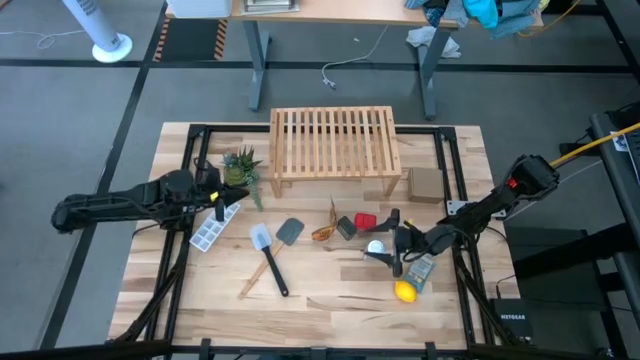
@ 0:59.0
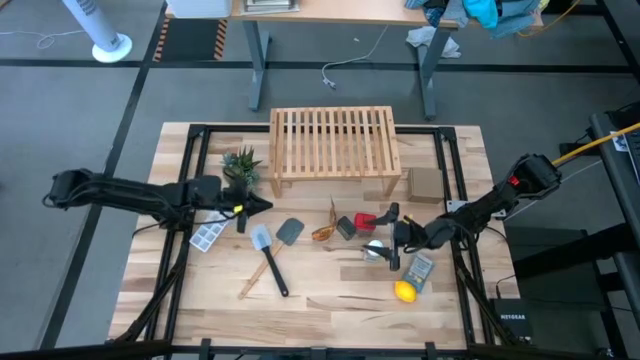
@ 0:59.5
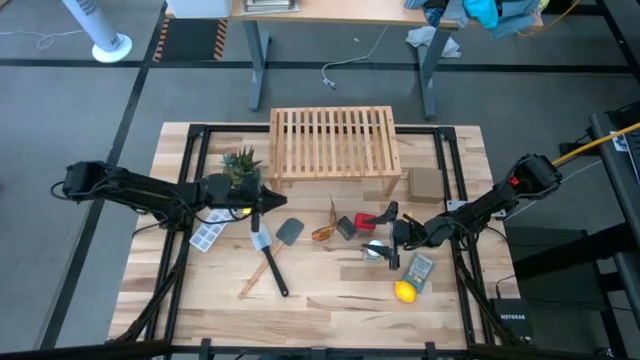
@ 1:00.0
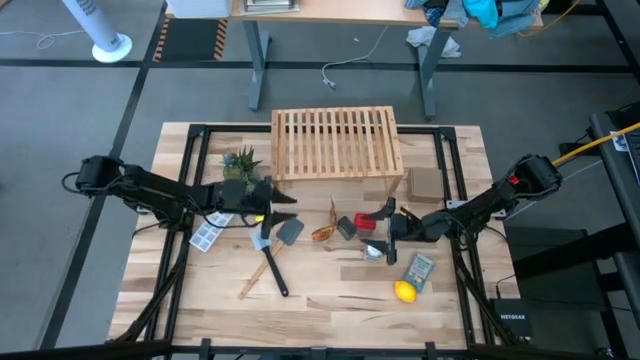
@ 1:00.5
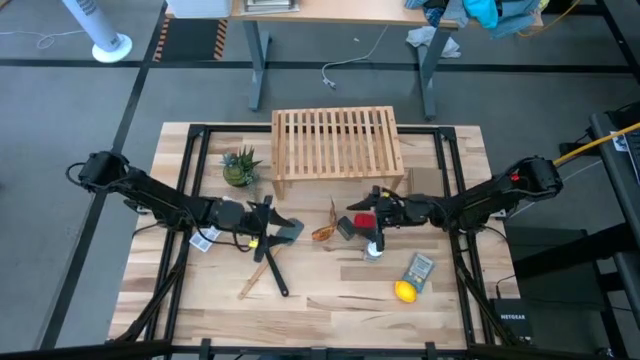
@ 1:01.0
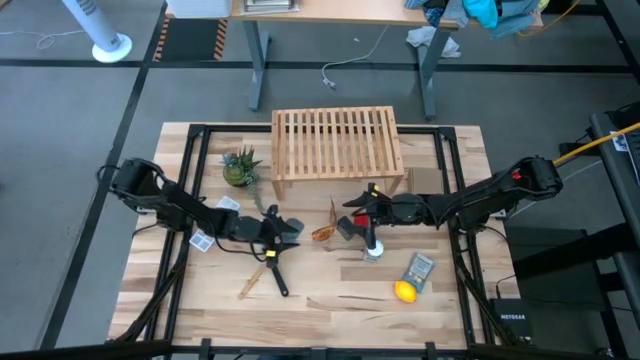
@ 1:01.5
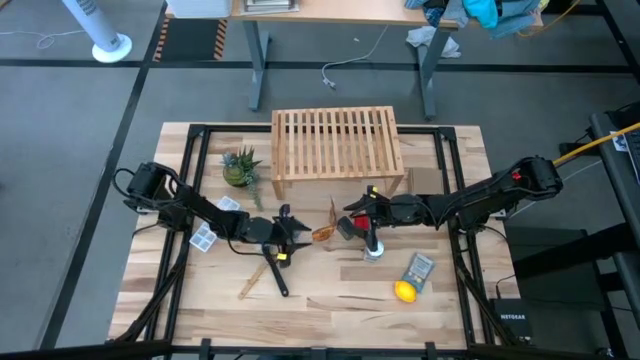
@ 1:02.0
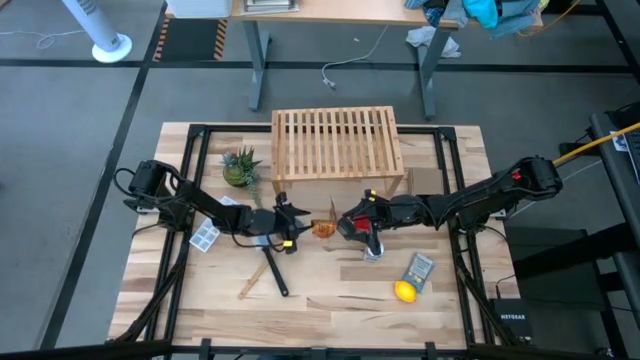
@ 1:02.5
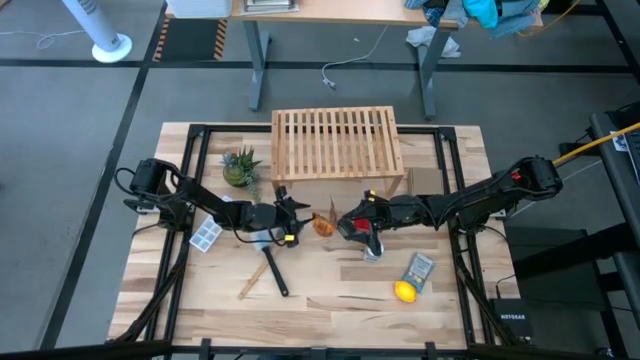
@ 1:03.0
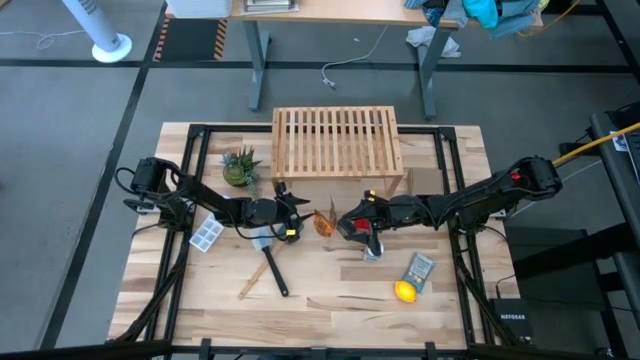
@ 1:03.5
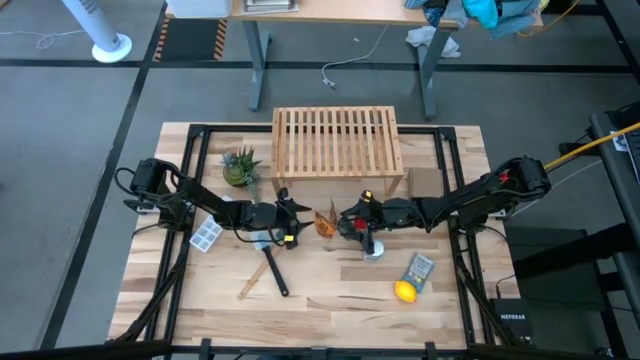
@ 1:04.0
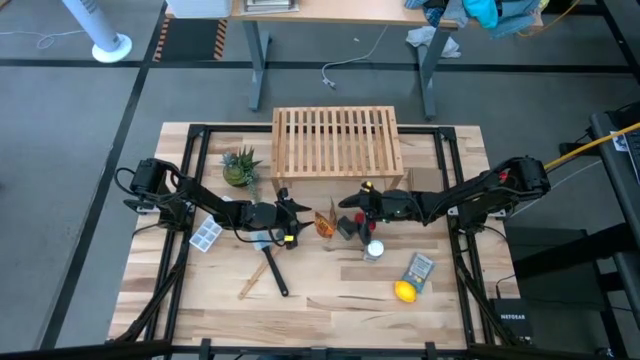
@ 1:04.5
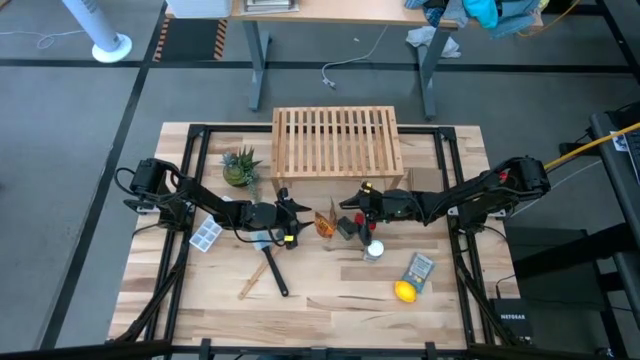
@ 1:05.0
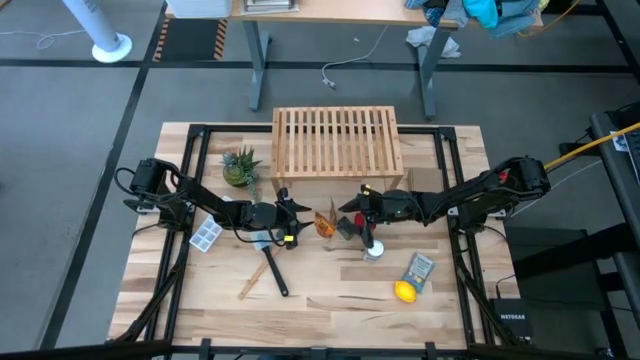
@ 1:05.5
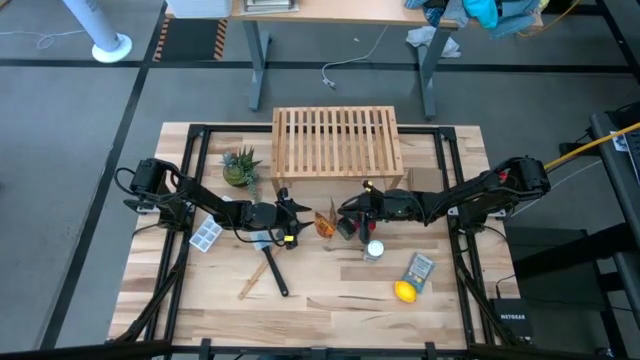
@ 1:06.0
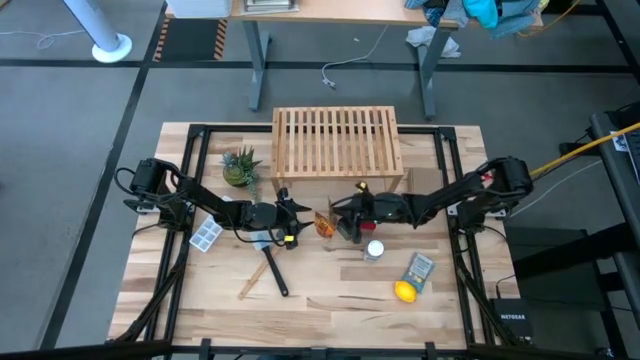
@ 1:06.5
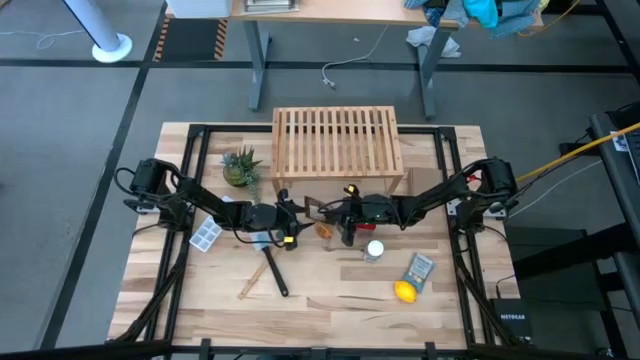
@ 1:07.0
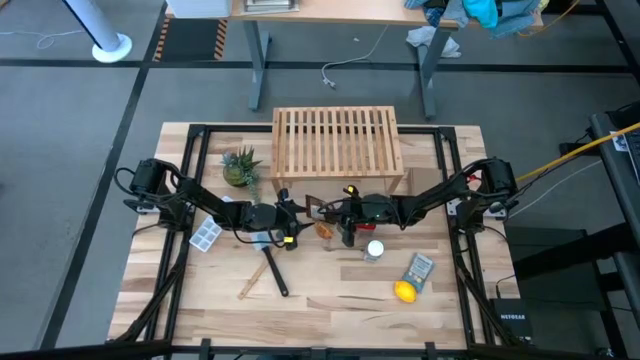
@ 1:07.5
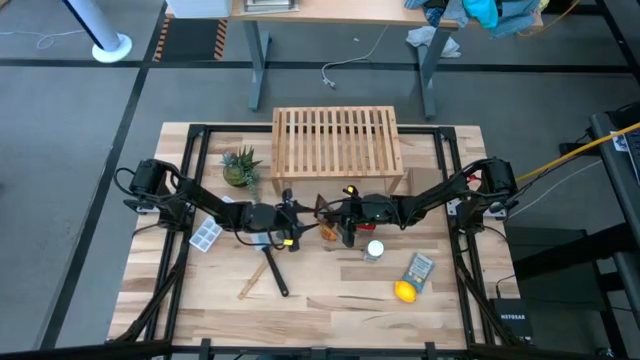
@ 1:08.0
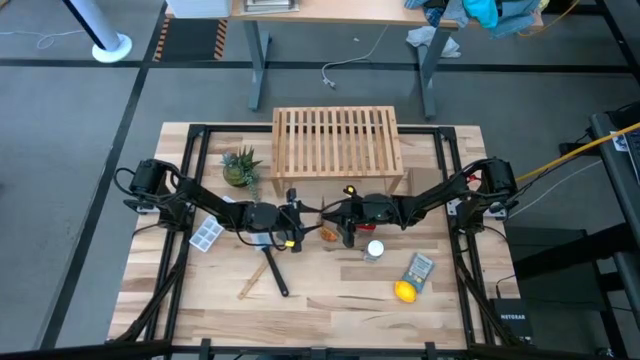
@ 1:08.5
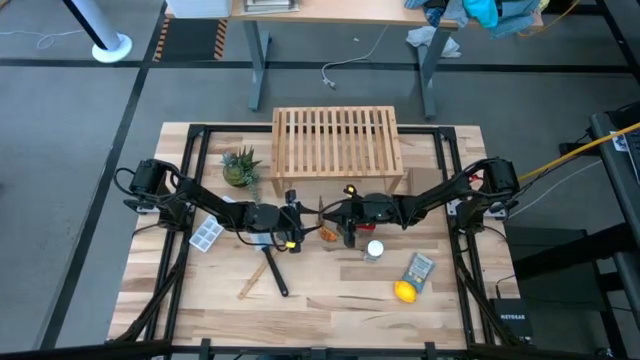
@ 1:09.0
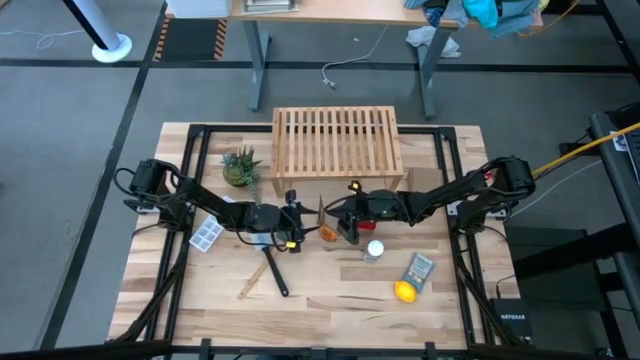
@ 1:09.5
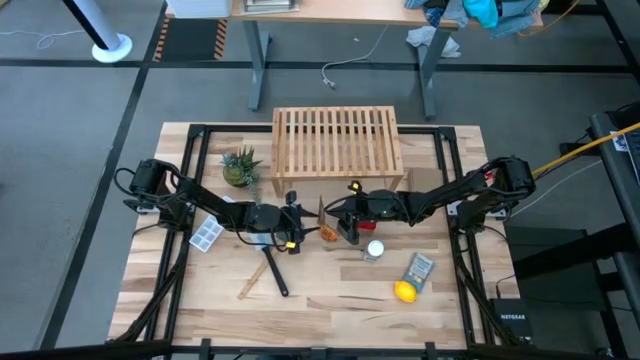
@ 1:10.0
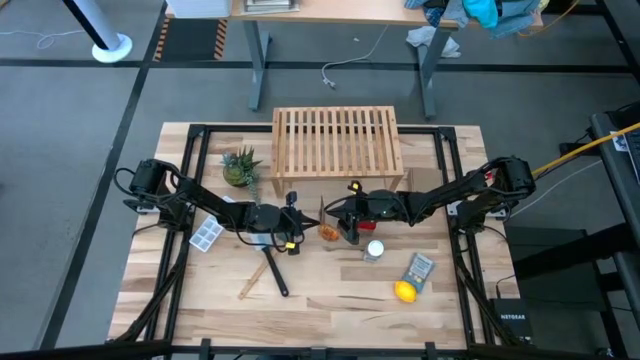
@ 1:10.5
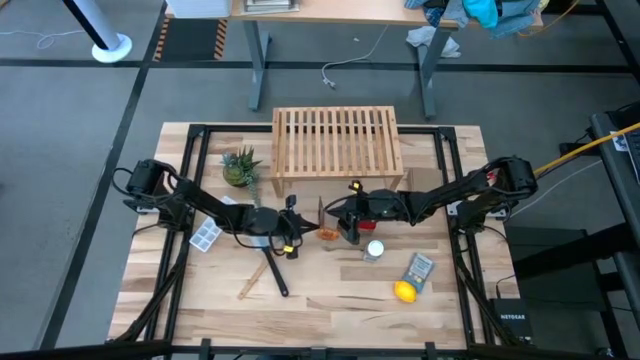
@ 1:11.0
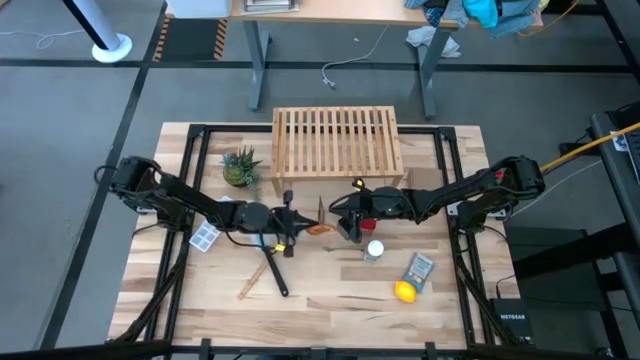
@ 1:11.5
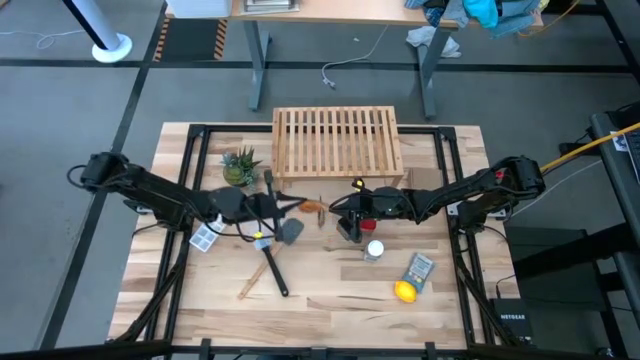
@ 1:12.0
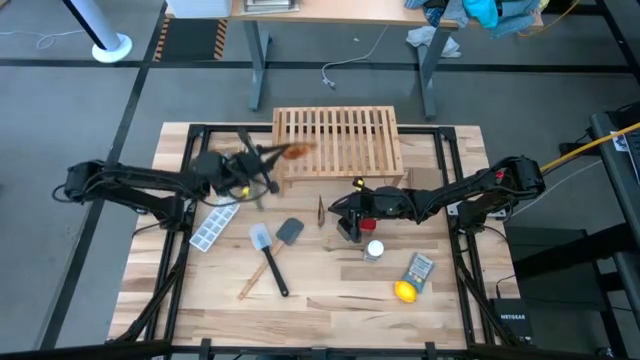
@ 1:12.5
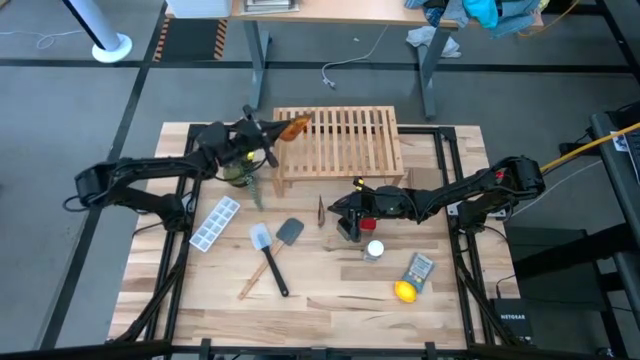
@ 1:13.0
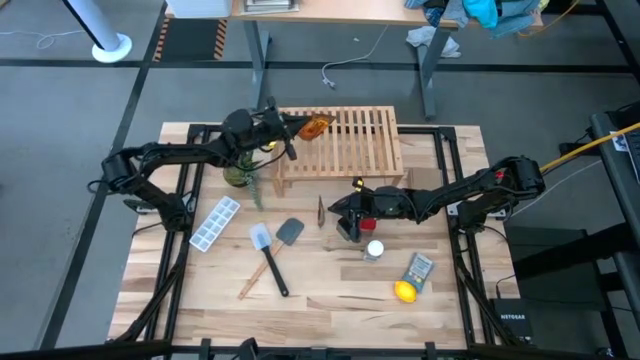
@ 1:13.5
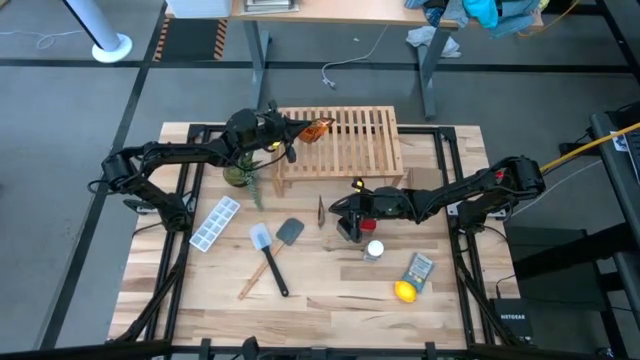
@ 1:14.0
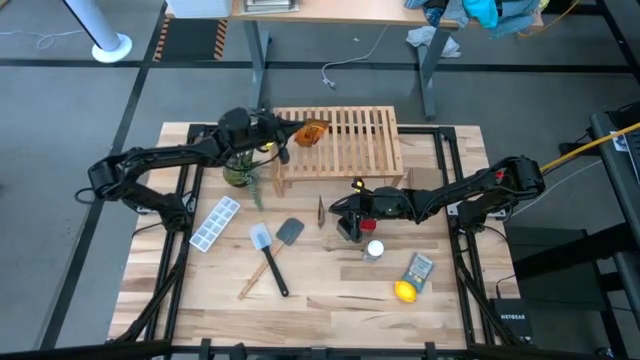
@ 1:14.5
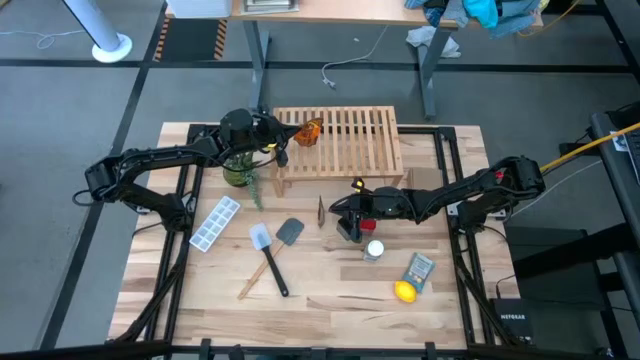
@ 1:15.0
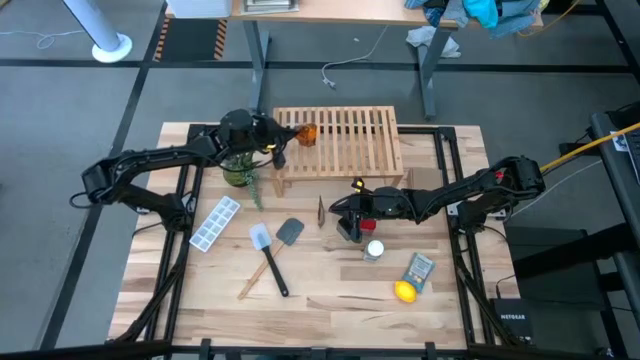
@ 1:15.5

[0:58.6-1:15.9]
Task: Shelf spices
Put the orange seasoning pack on the shelf
